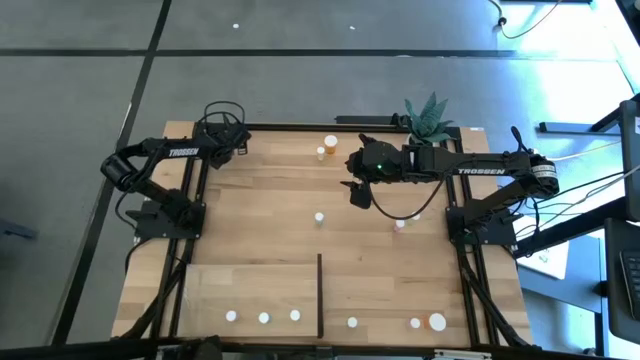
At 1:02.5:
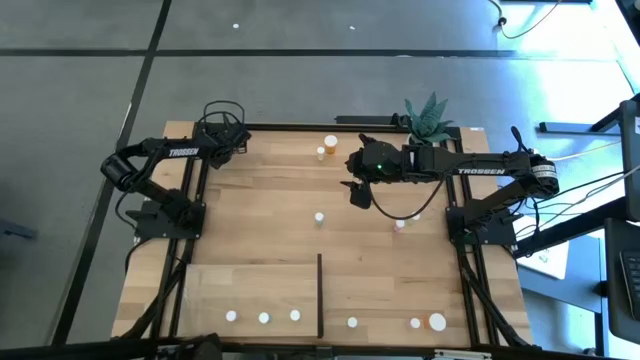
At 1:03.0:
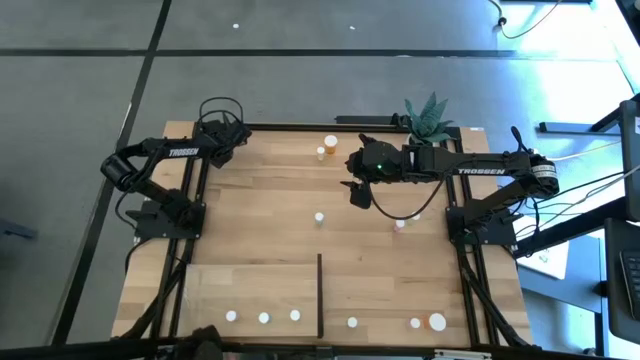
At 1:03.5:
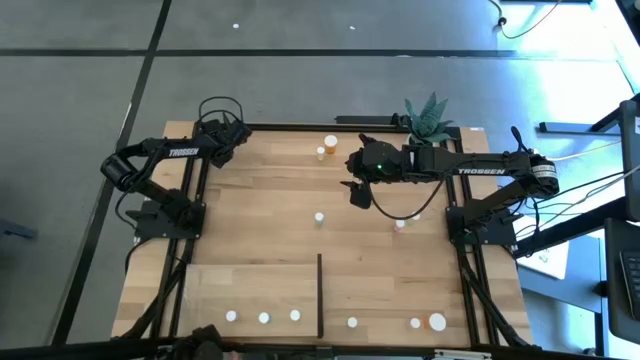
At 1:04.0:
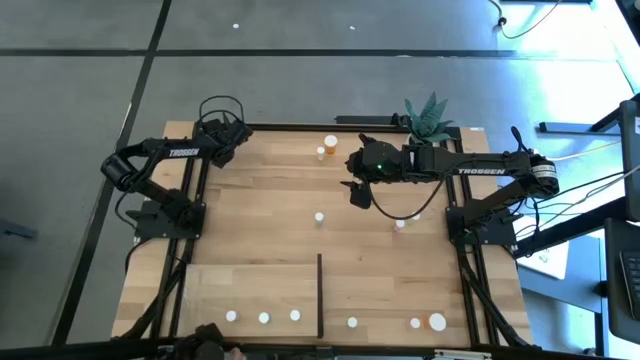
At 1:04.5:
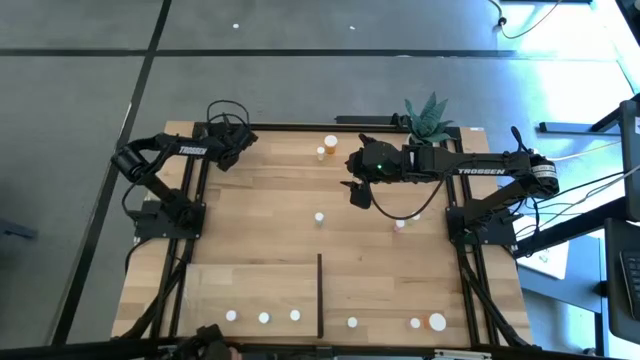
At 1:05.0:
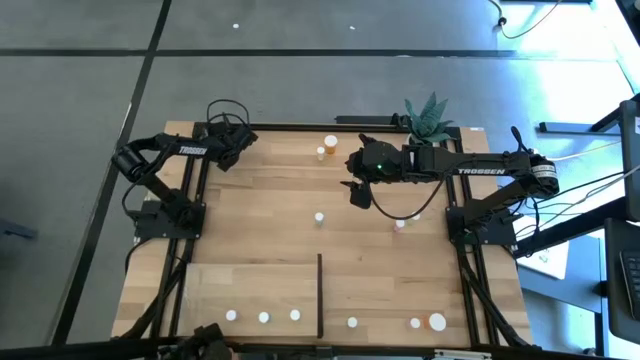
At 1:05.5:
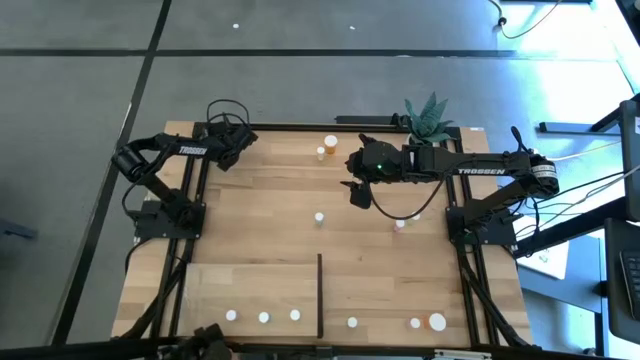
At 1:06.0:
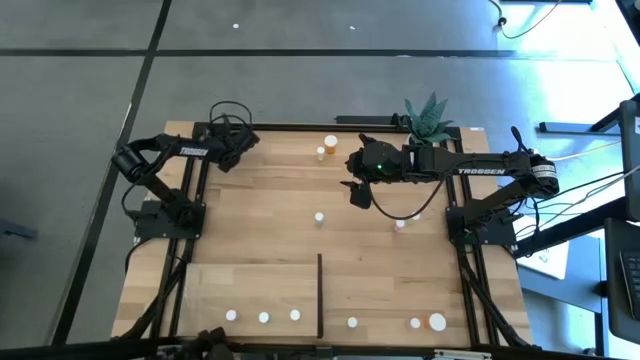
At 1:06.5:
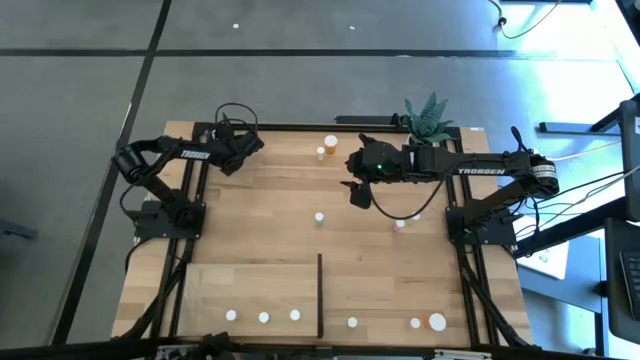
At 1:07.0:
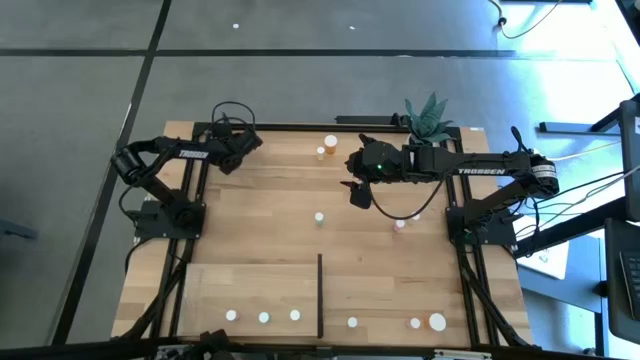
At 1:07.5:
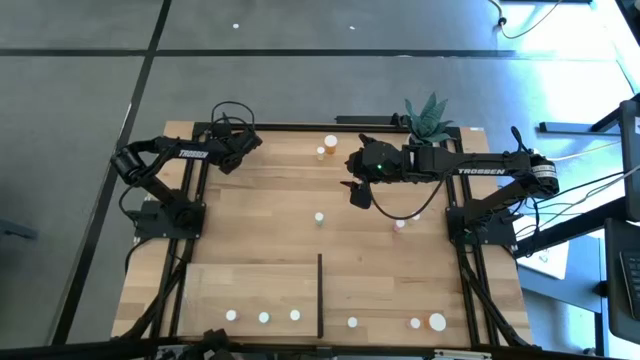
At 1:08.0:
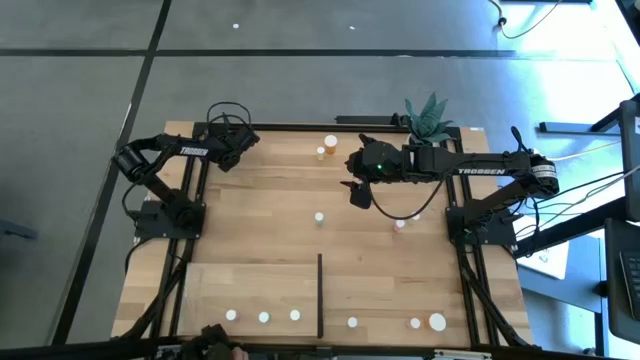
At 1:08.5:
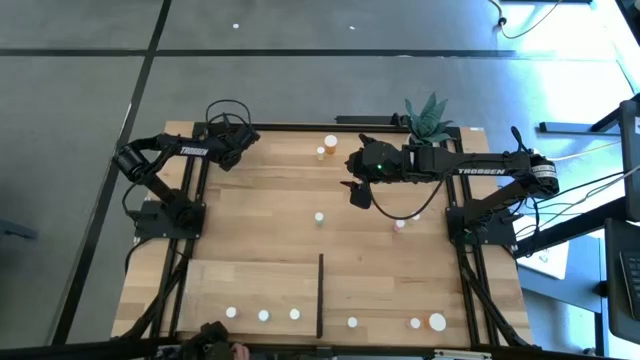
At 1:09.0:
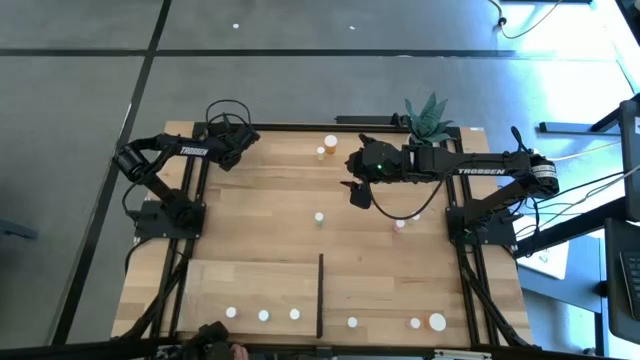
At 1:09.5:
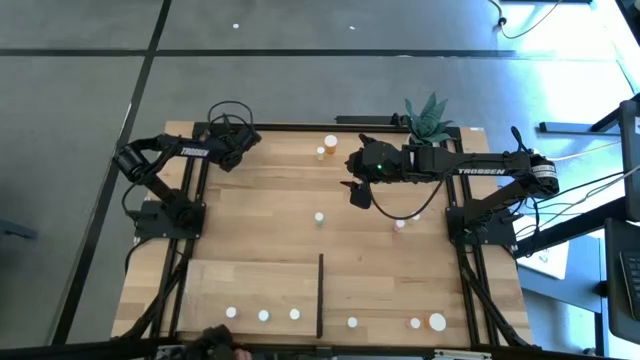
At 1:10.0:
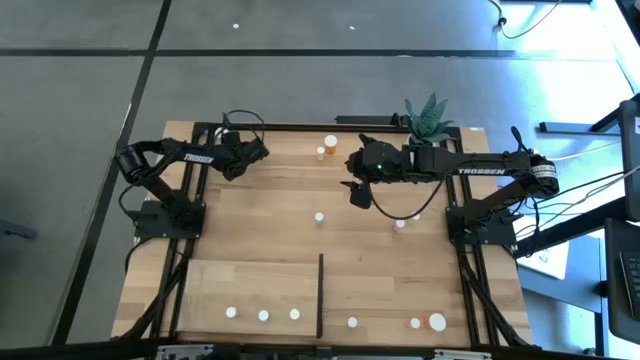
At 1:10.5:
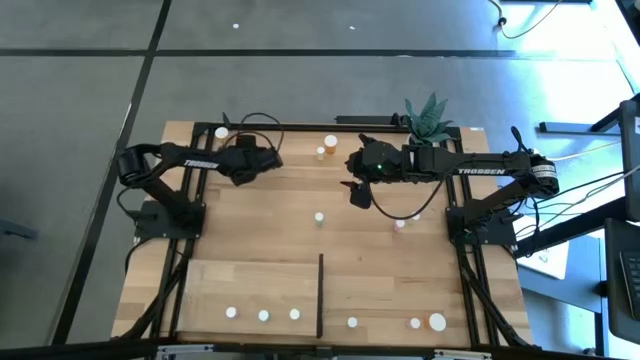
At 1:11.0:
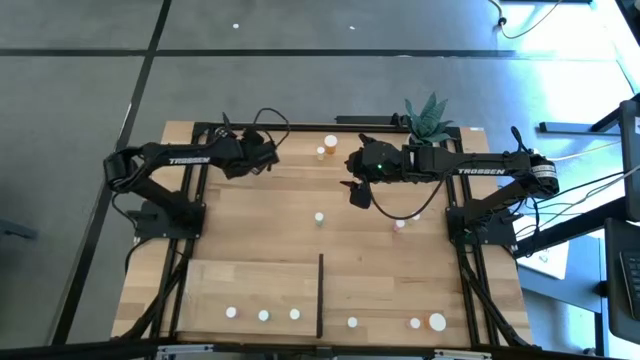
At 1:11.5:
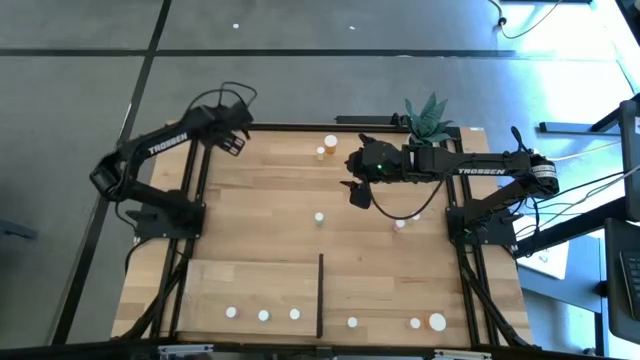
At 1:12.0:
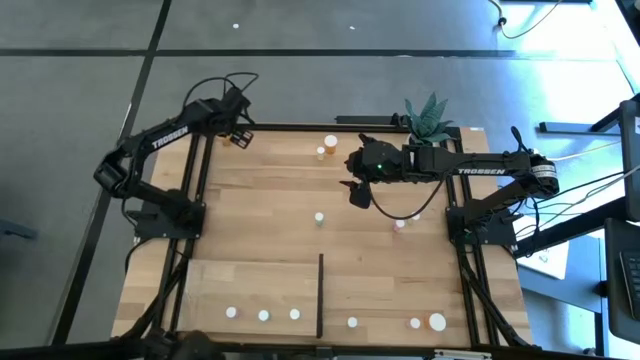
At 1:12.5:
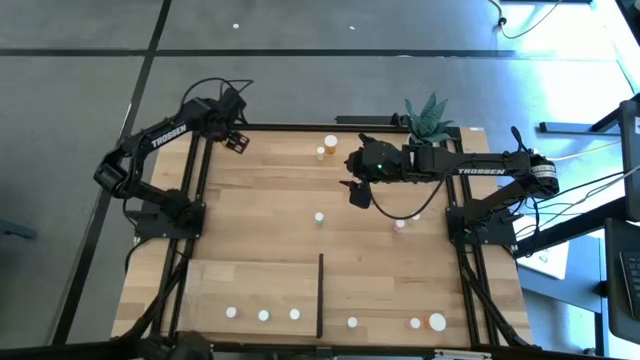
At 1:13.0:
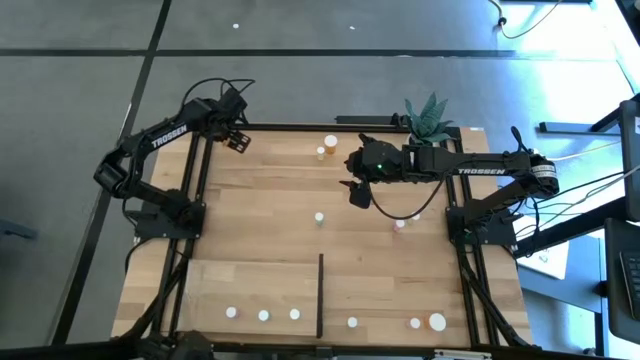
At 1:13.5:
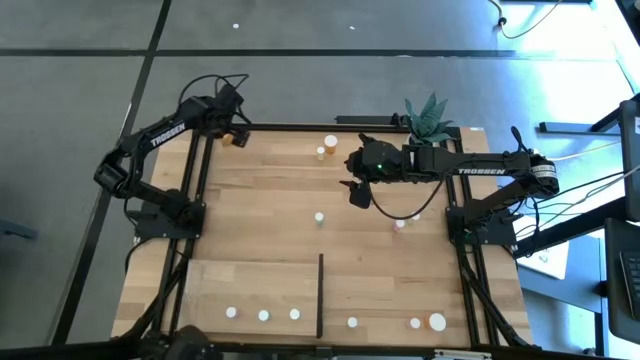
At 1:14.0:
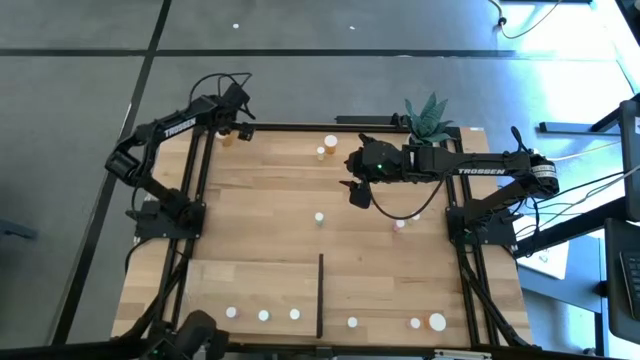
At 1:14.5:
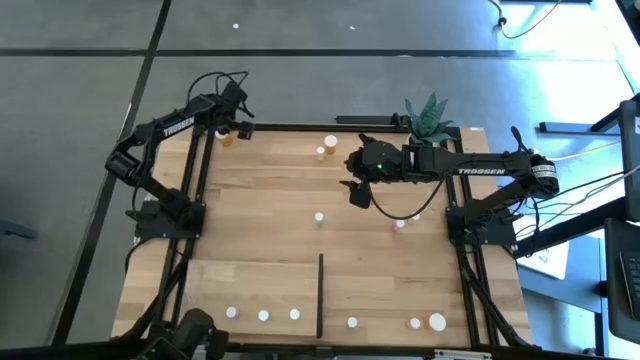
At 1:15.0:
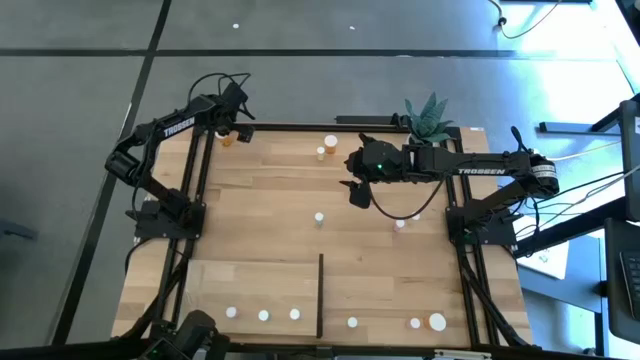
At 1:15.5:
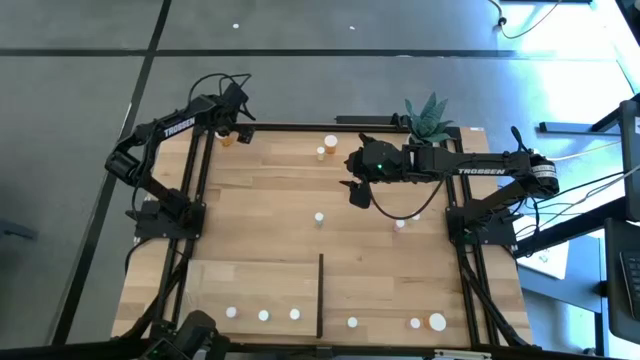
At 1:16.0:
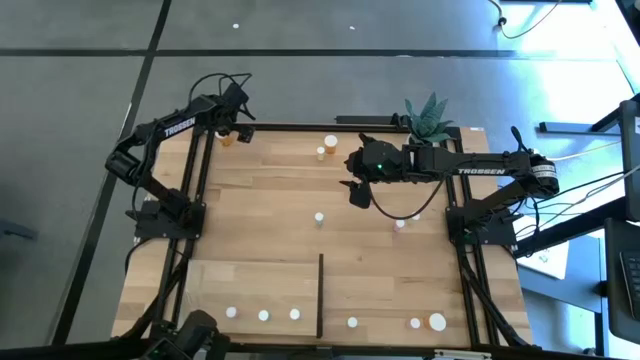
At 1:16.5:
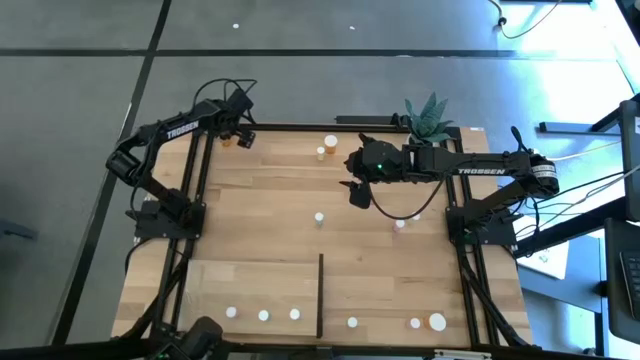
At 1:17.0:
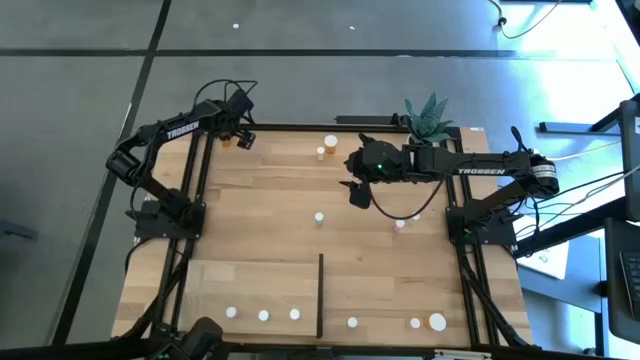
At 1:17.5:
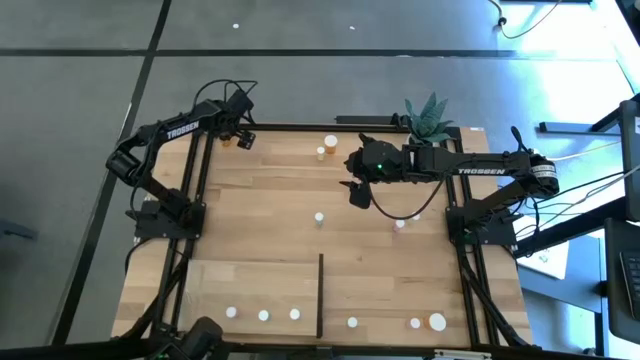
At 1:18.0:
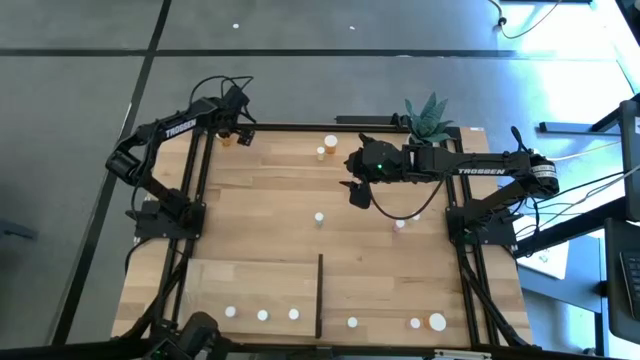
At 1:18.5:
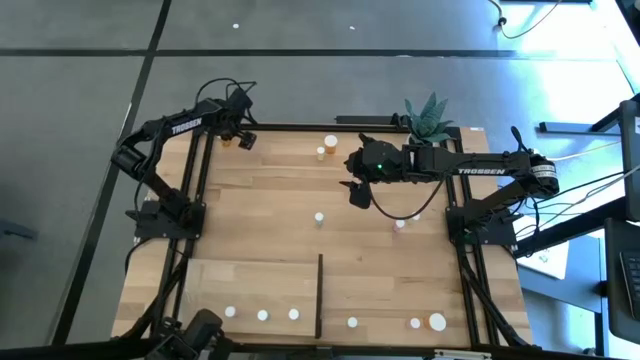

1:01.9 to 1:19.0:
Task: Pick and place medicine bottles onto shelf by color
Put the top left orange pill bottle on the shelf

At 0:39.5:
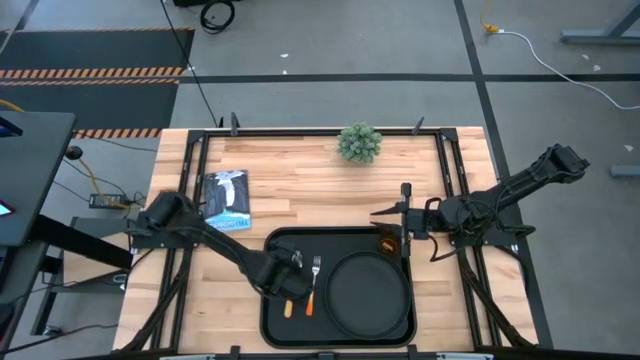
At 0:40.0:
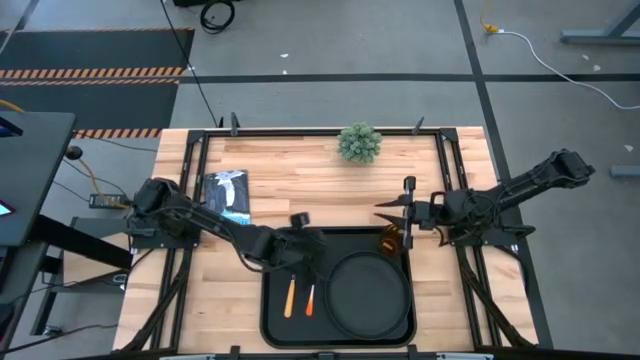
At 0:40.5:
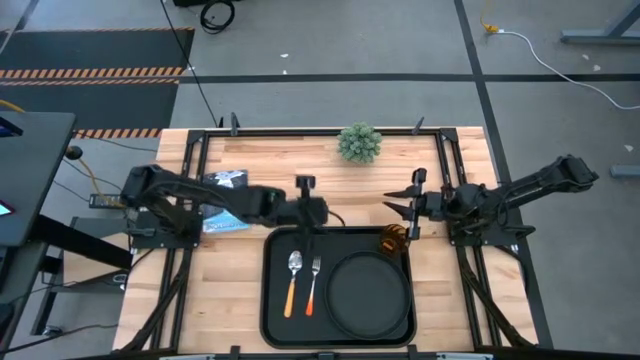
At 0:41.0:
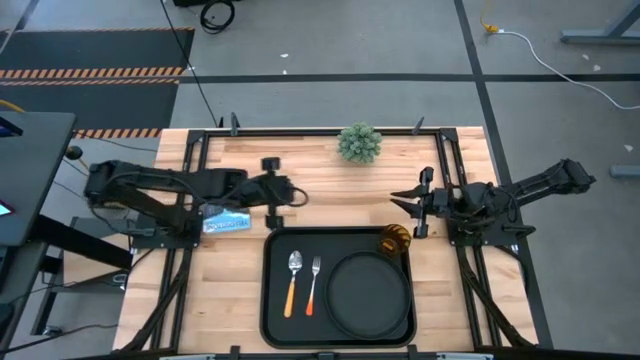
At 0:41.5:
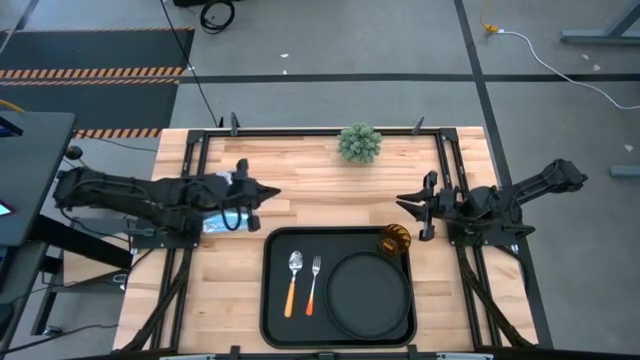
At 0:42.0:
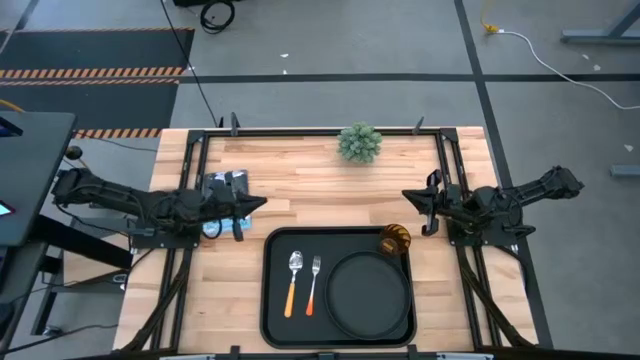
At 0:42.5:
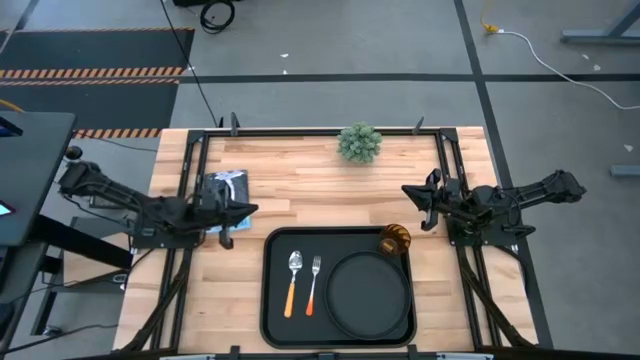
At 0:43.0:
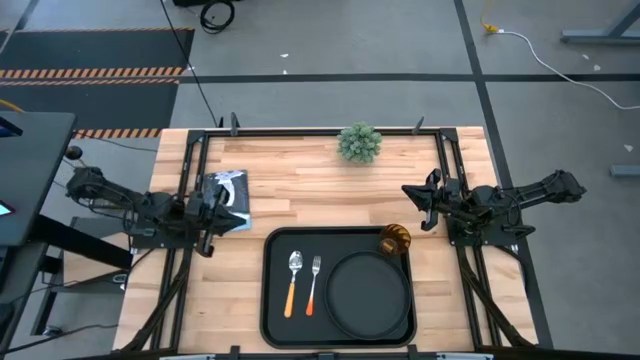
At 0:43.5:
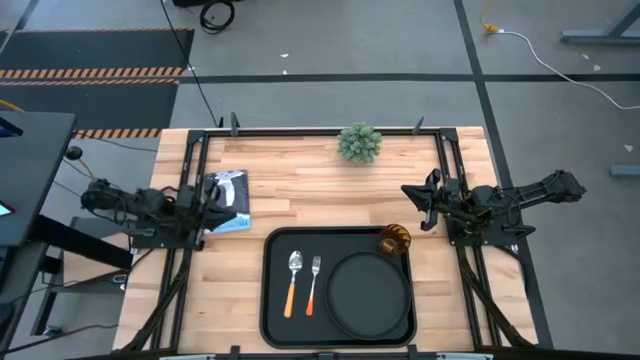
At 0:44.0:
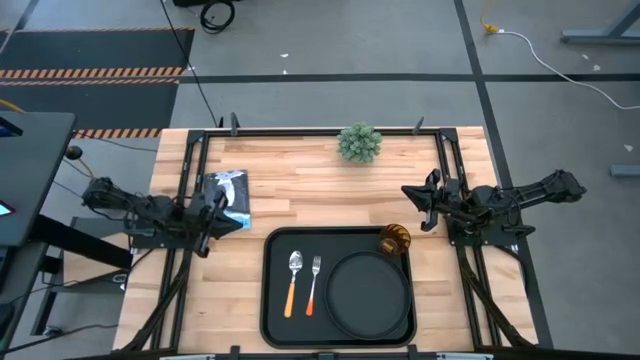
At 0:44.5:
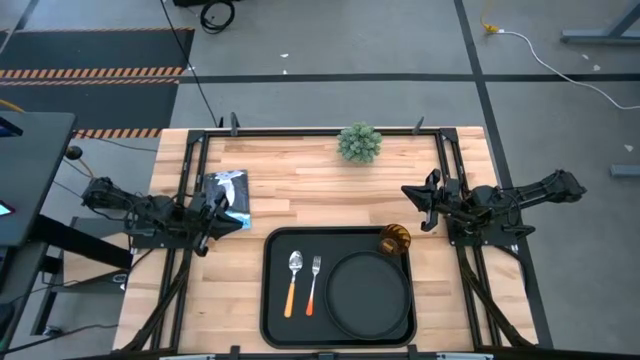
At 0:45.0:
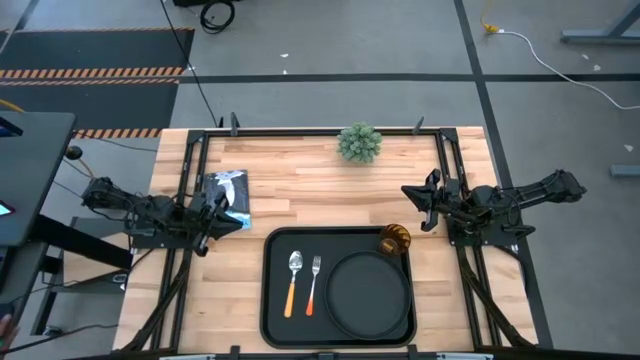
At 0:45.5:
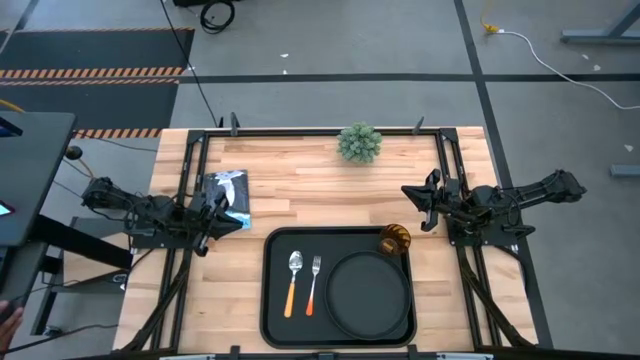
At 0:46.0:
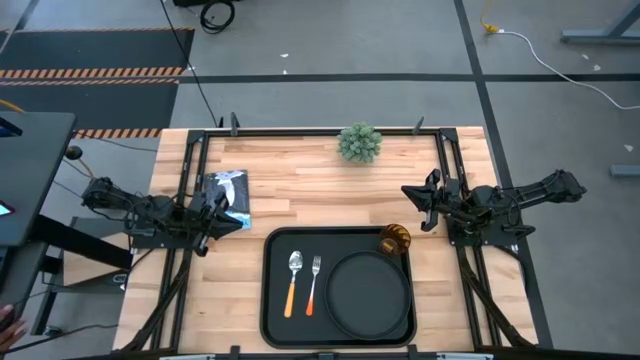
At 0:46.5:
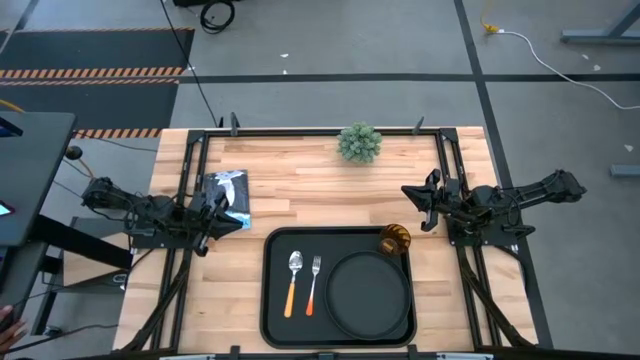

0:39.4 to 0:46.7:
Task: Pick and place plate/cup/fork/spoon on tray
Return to Home Position
